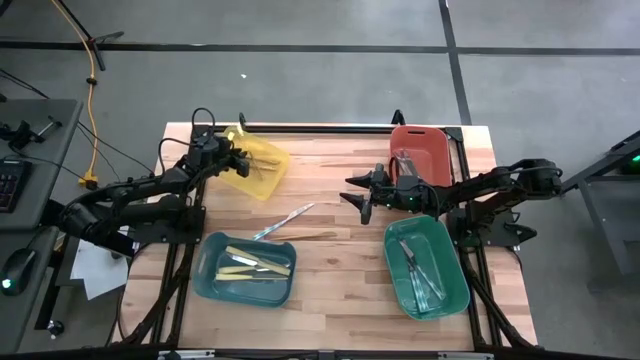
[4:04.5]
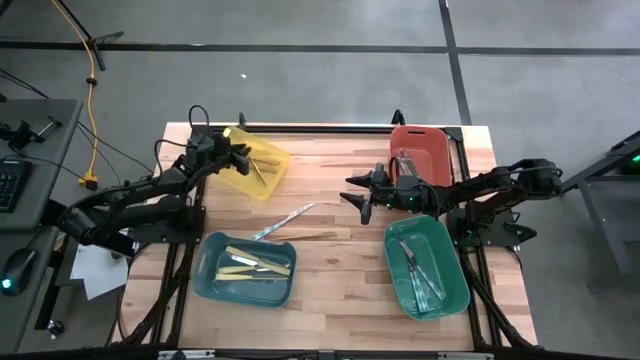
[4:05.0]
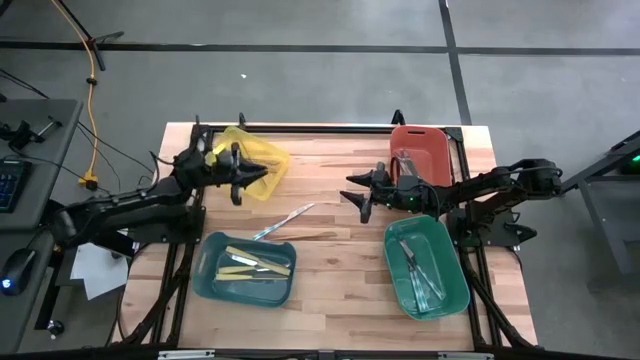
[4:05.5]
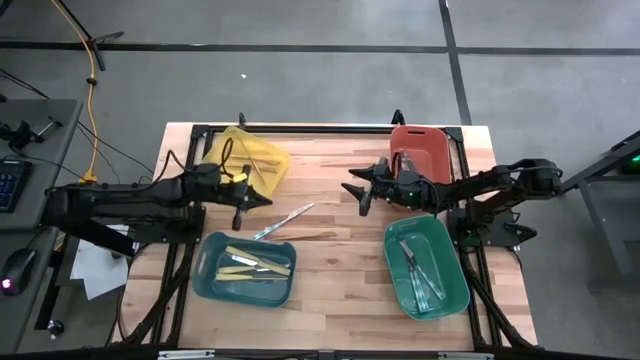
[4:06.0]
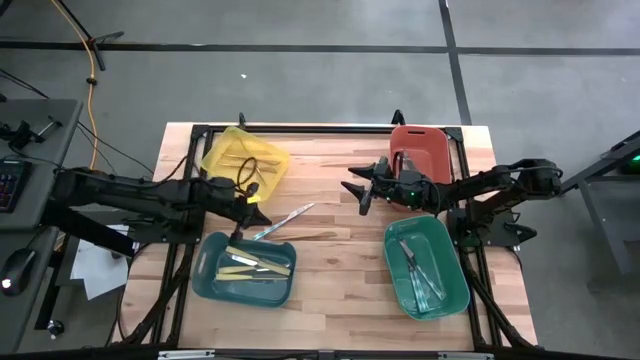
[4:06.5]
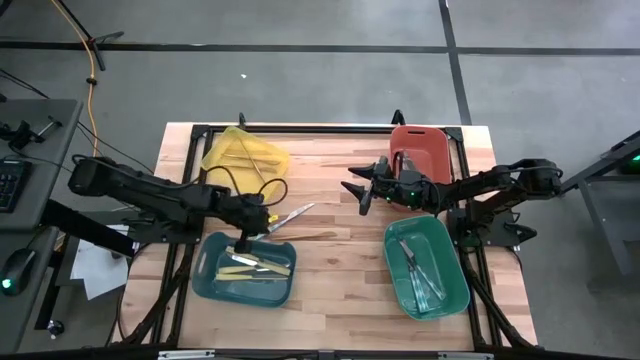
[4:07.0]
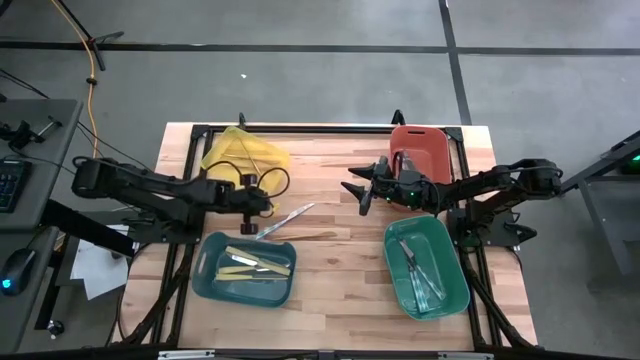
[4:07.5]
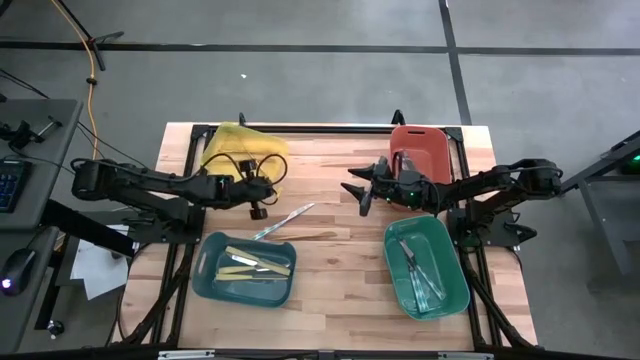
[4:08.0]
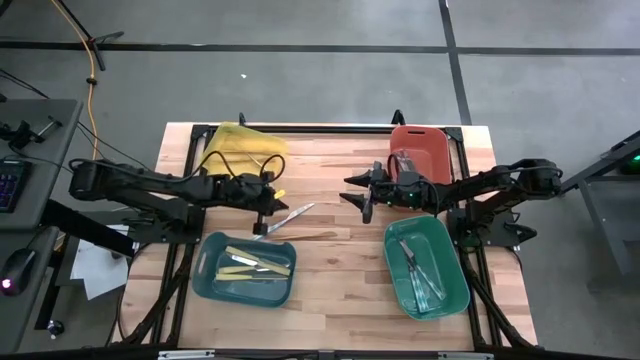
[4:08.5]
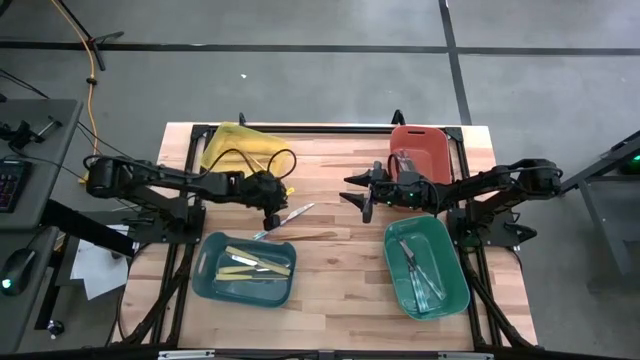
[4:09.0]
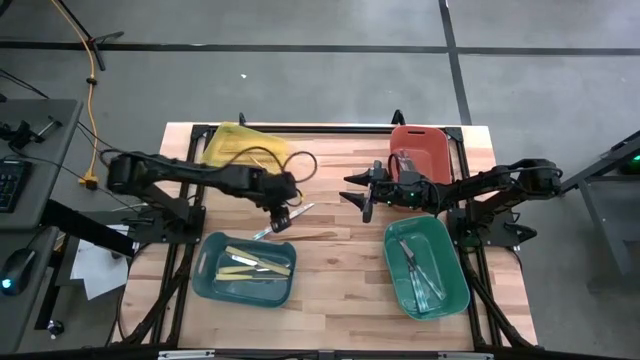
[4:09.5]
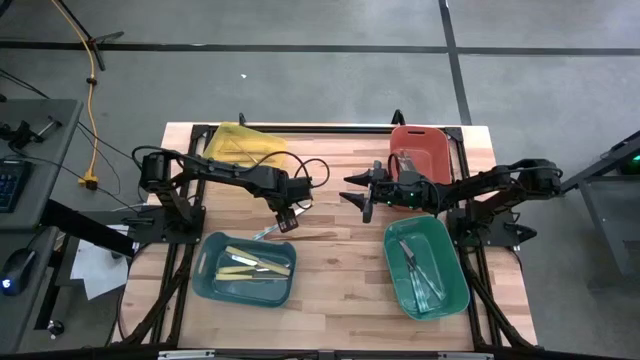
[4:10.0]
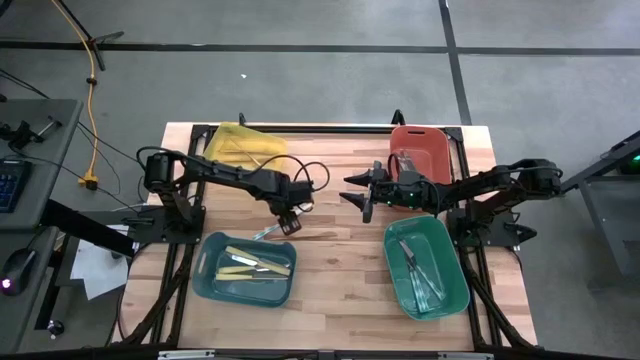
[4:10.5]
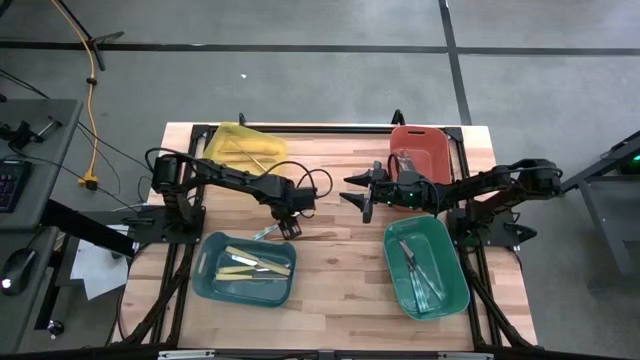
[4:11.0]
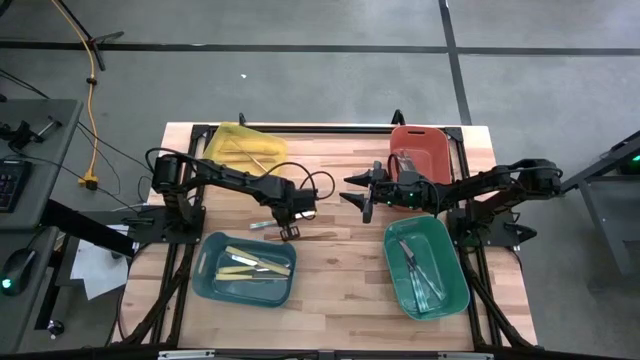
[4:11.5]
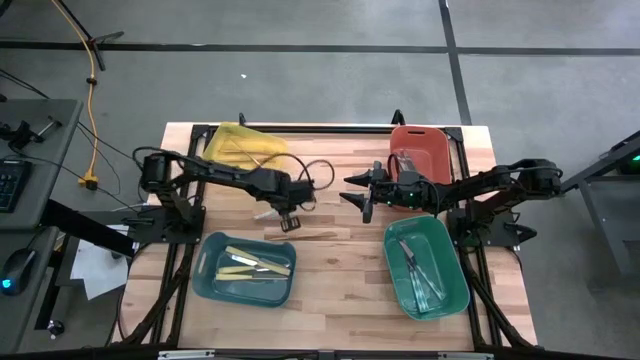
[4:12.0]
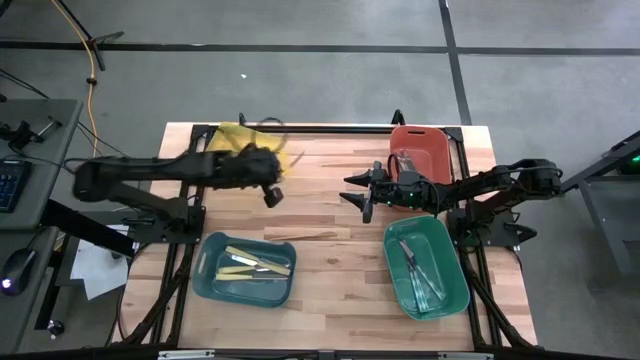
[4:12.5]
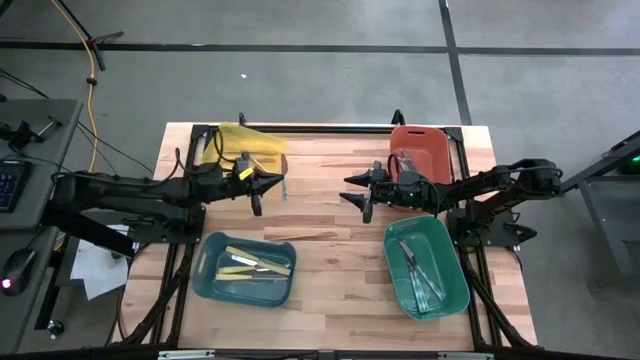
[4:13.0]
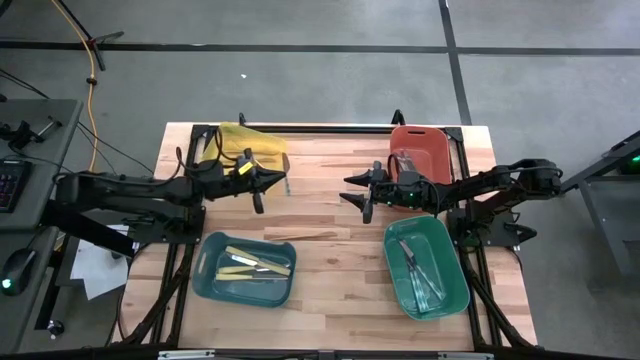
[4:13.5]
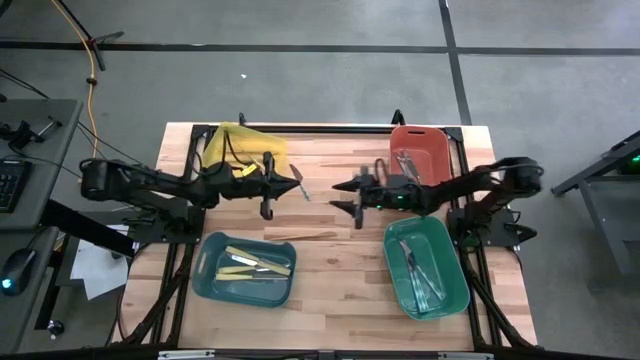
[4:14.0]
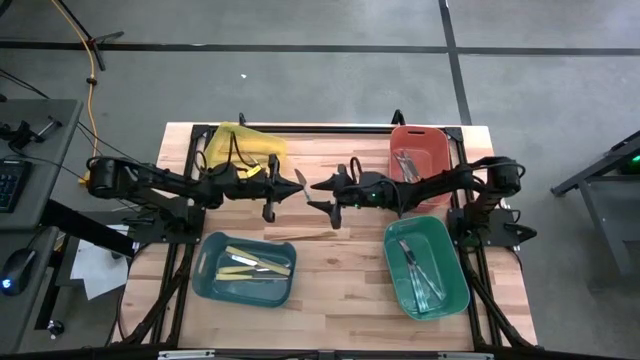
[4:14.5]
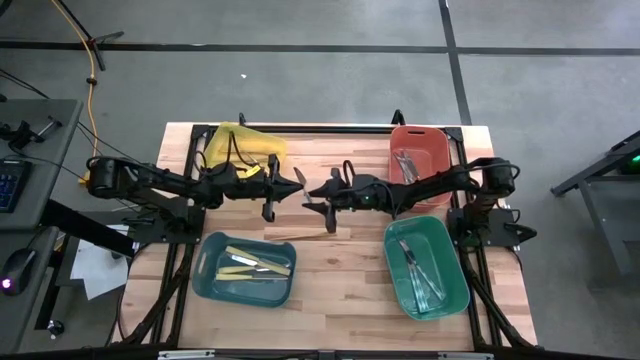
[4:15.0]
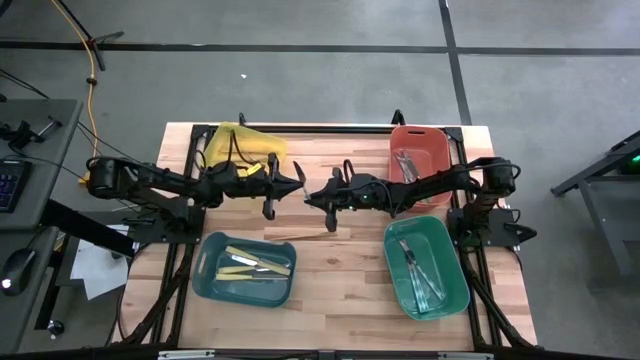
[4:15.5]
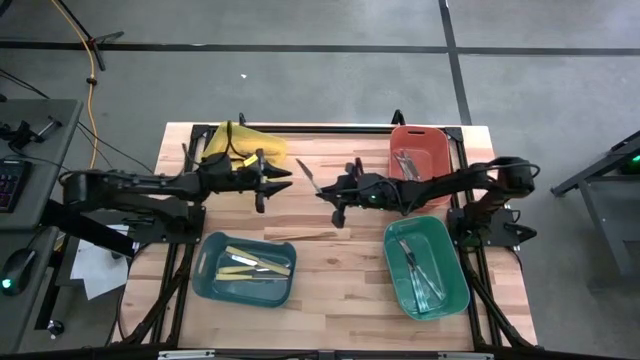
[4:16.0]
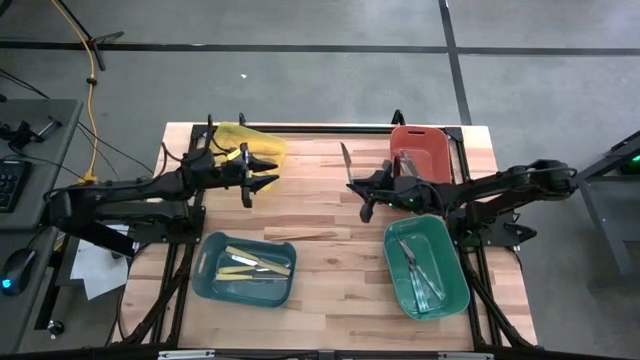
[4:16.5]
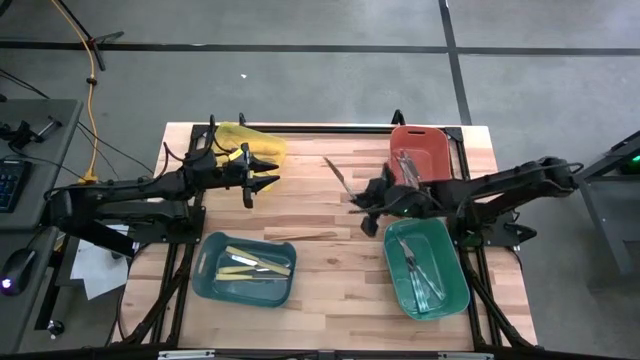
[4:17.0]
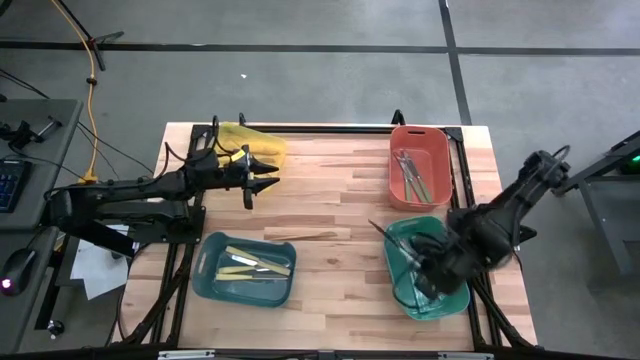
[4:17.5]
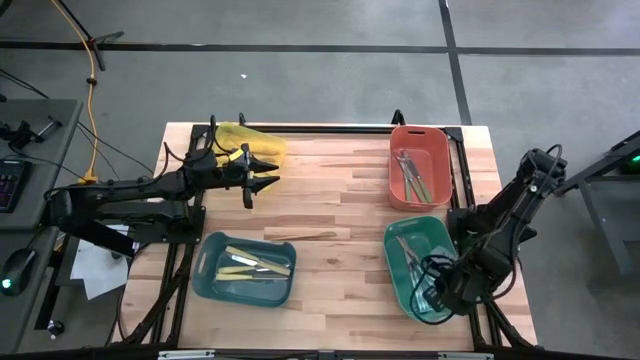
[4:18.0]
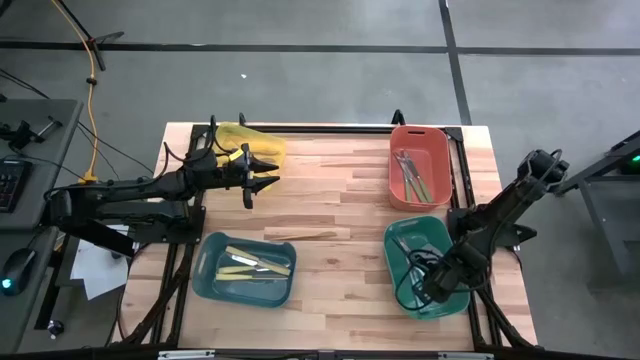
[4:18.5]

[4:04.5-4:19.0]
Task: Sort silverware by color (type)
Put the patterned green knife into the green bin

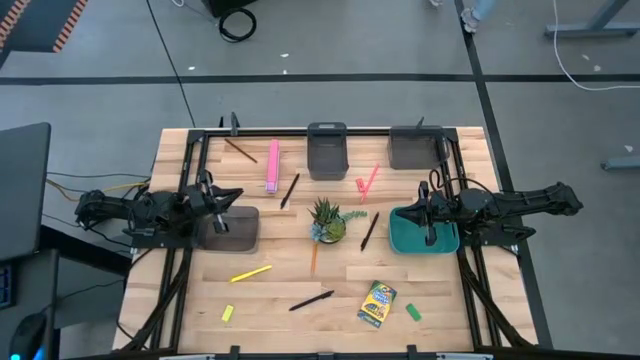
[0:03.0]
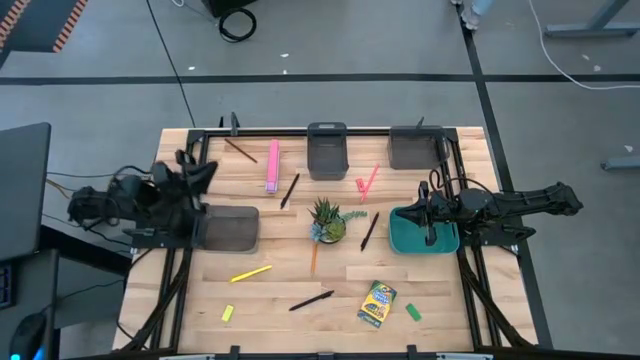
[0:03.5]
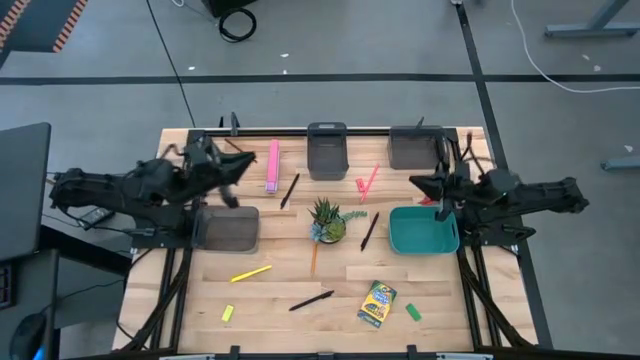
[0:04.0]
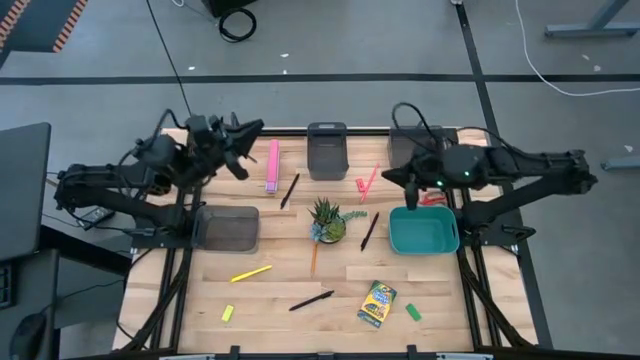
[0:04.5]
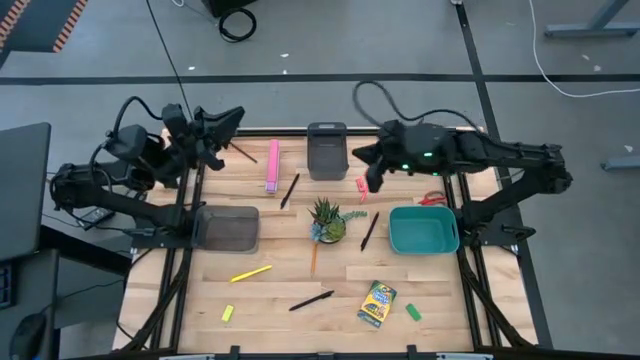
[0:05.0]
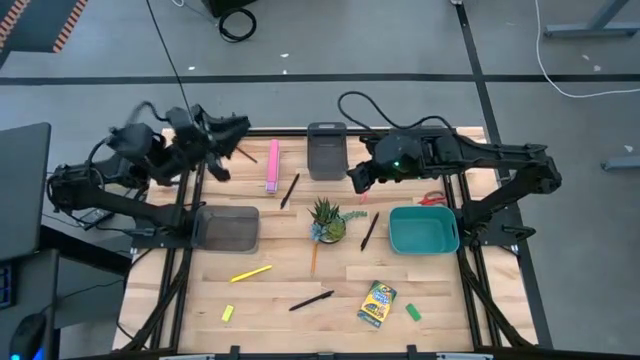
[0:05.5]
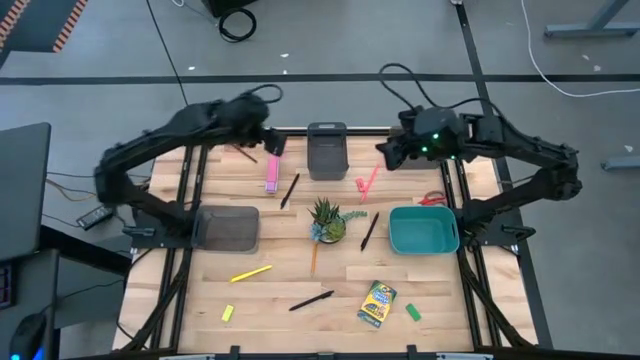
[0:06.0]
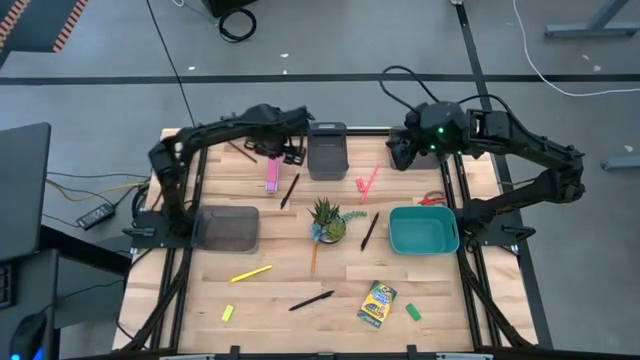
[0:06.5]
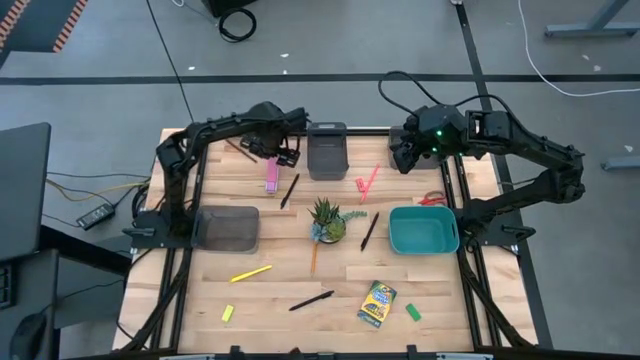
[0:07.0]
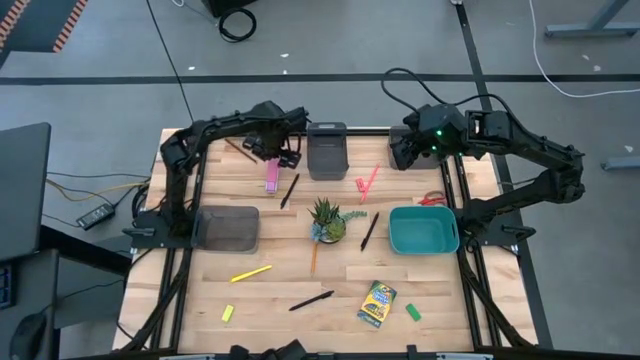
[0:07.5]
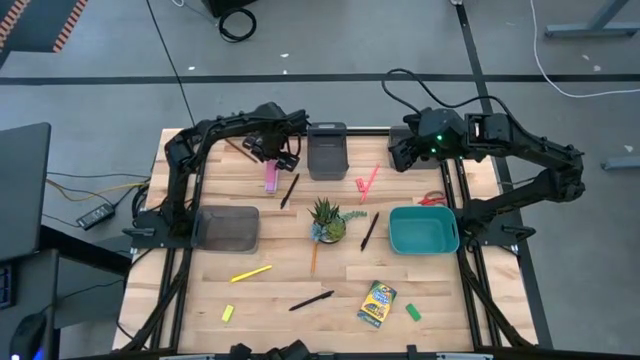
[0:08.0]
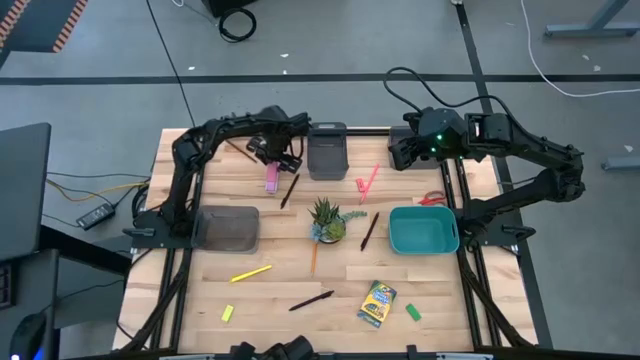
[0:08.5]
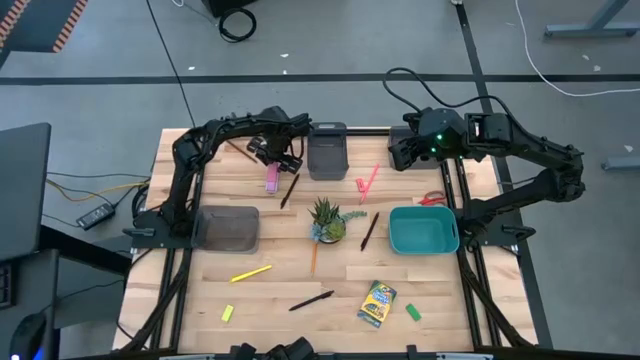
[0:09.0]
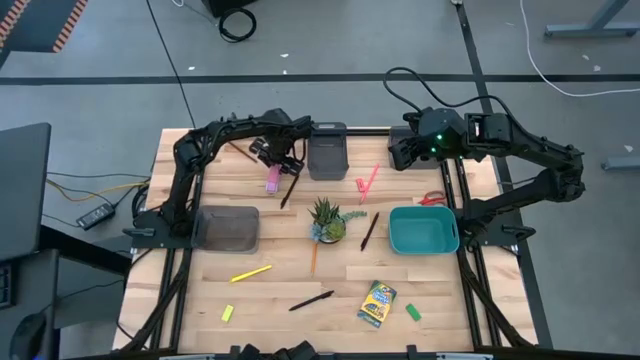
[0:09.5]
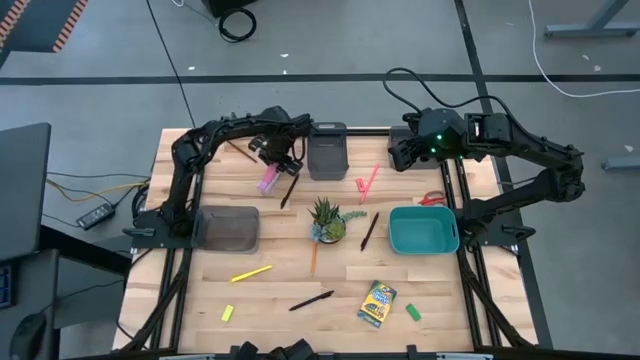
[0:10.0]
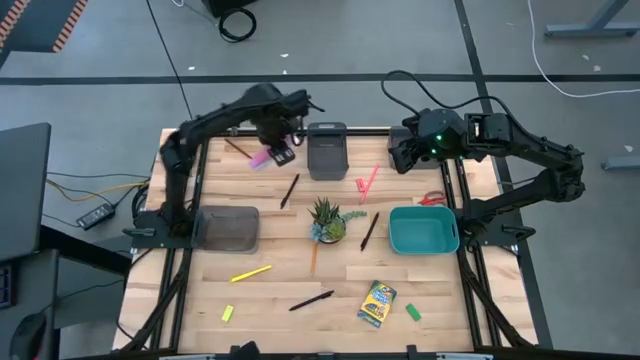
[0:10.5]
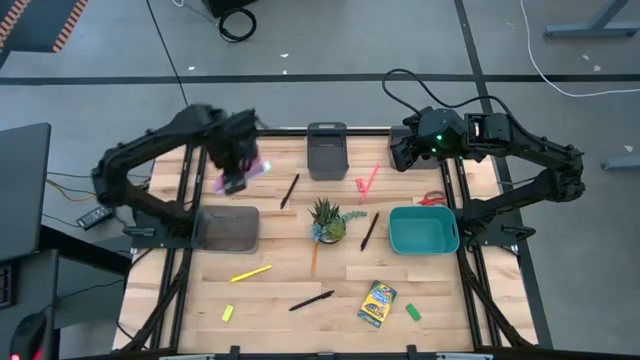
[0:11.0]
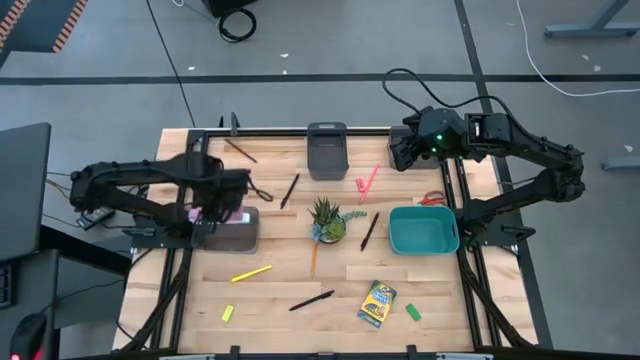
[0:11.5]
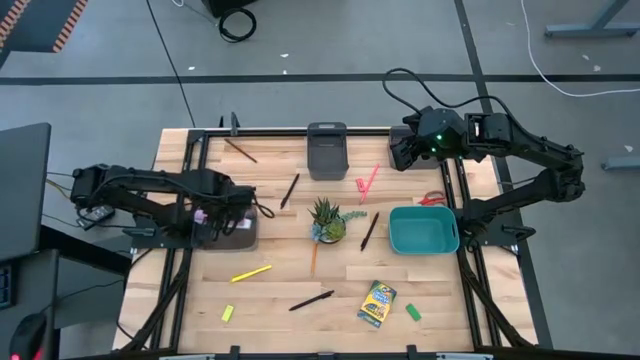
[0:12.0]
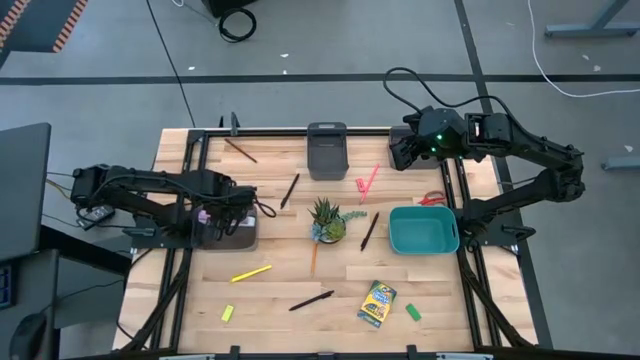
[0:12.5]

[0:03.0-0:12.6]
Task: Sort crayons/erasers/pens/pencils in bins
Put the pink stapler into the bottom black bin
